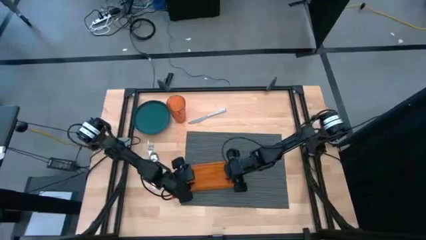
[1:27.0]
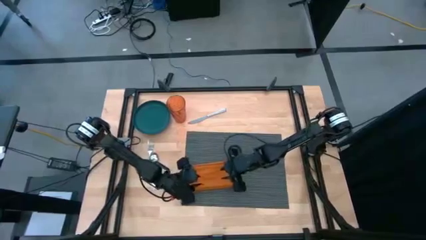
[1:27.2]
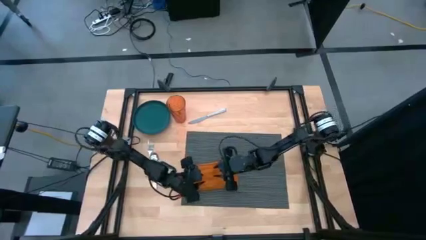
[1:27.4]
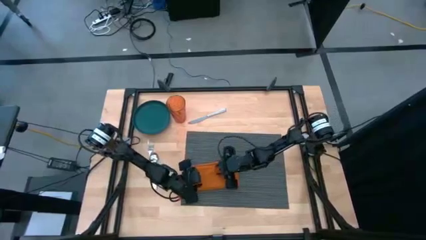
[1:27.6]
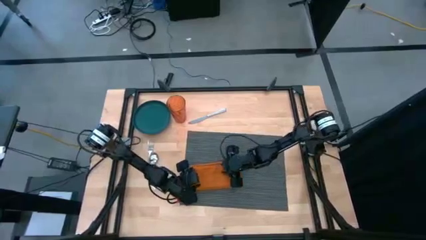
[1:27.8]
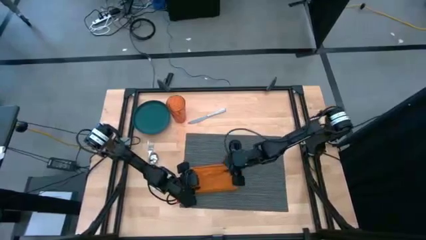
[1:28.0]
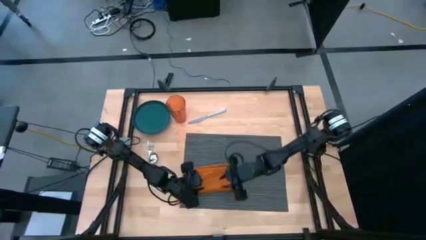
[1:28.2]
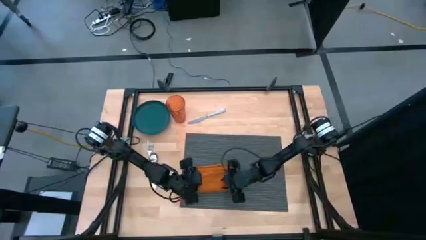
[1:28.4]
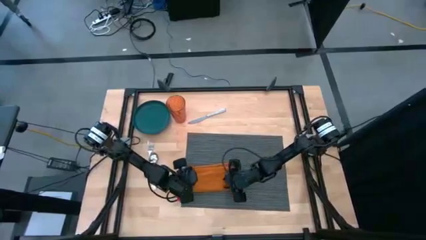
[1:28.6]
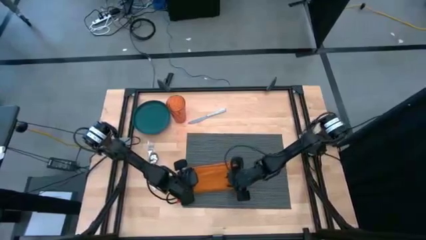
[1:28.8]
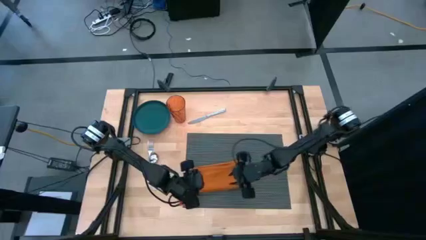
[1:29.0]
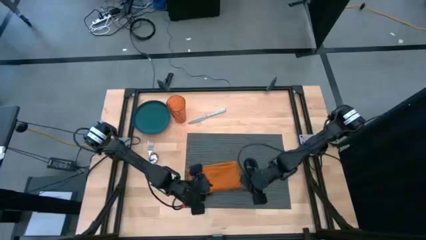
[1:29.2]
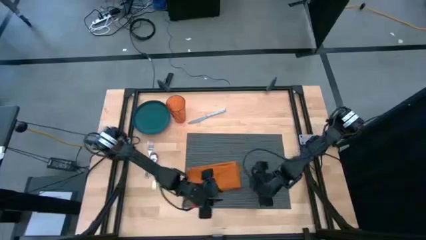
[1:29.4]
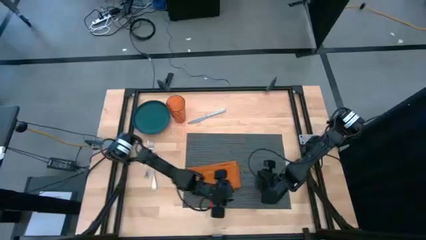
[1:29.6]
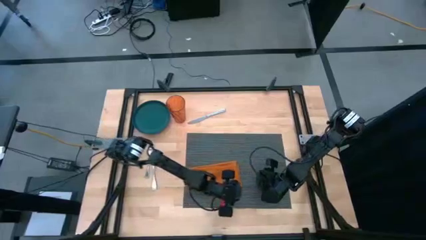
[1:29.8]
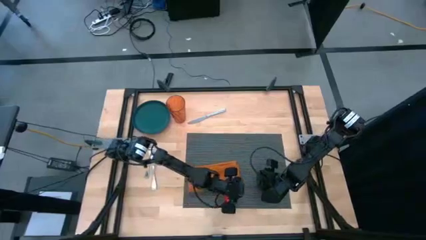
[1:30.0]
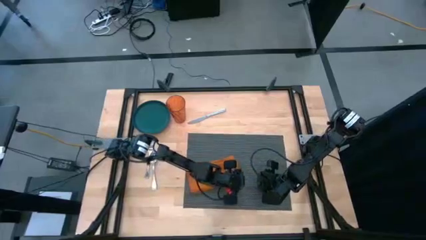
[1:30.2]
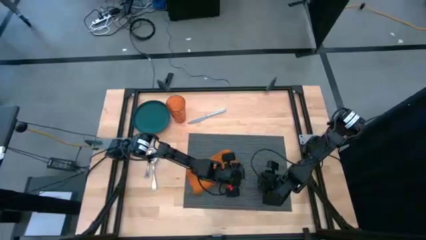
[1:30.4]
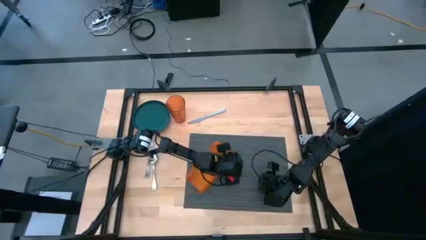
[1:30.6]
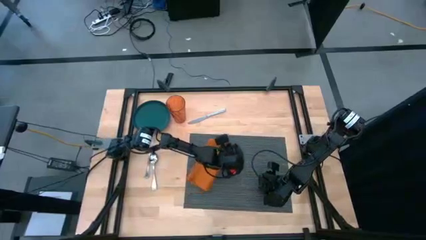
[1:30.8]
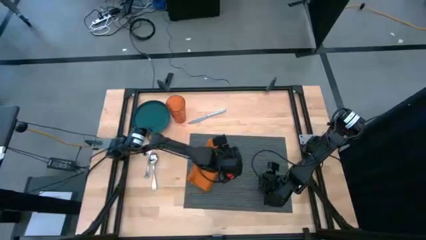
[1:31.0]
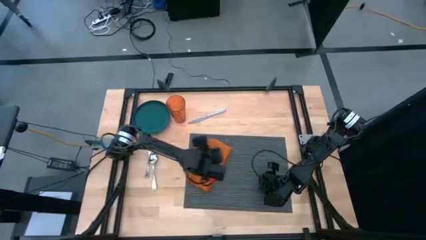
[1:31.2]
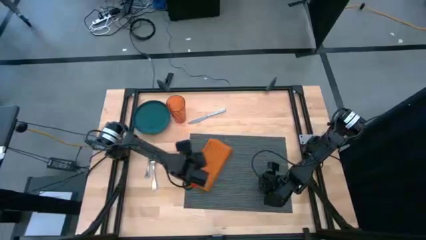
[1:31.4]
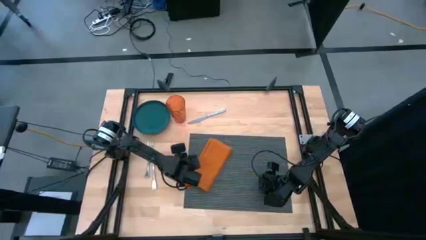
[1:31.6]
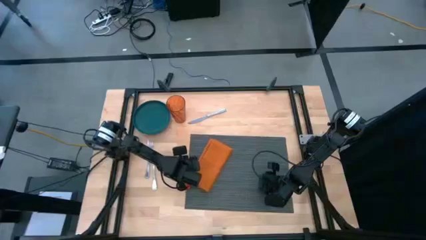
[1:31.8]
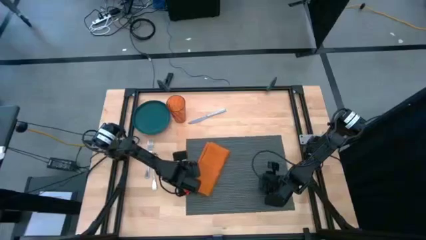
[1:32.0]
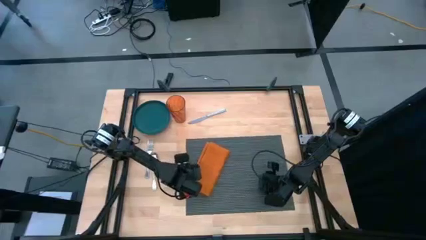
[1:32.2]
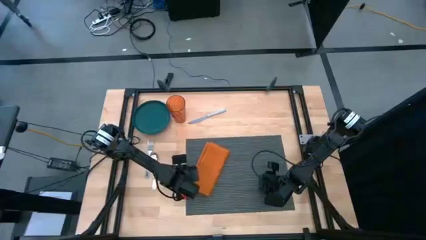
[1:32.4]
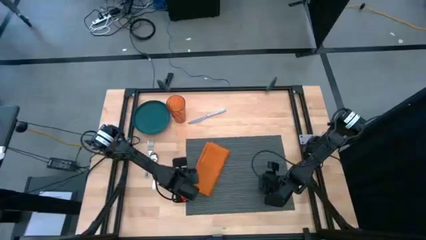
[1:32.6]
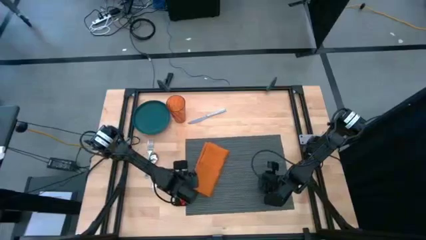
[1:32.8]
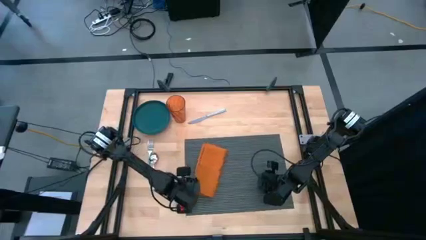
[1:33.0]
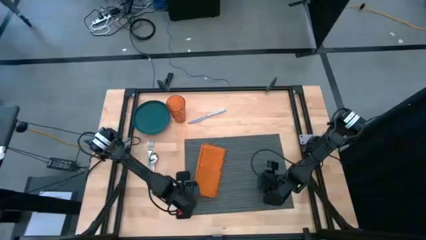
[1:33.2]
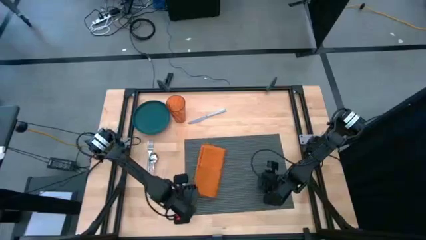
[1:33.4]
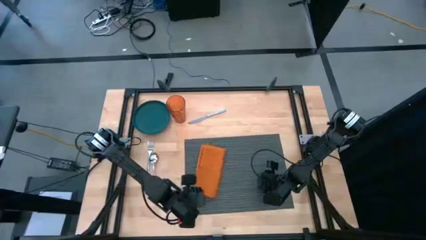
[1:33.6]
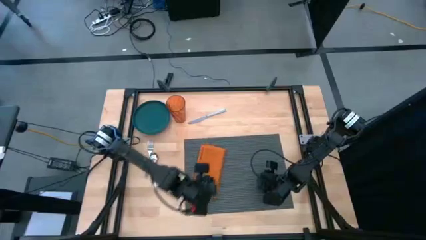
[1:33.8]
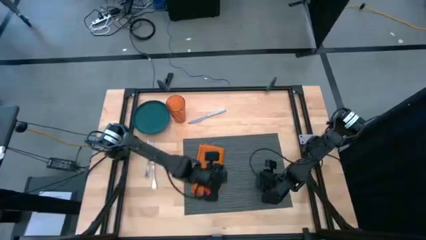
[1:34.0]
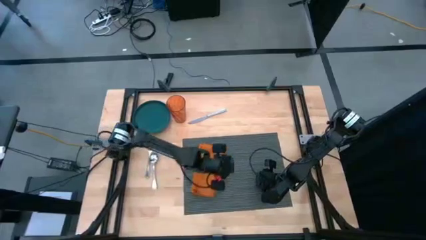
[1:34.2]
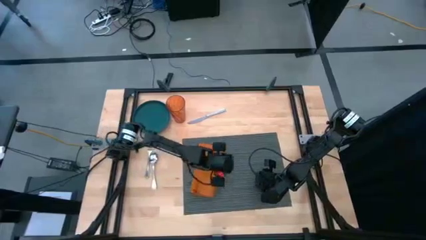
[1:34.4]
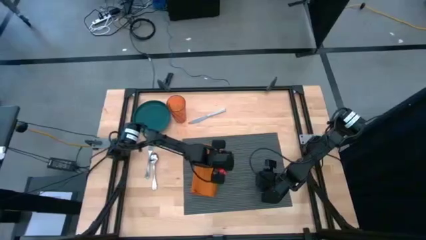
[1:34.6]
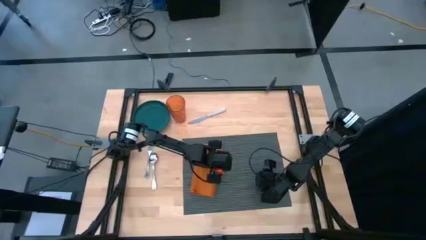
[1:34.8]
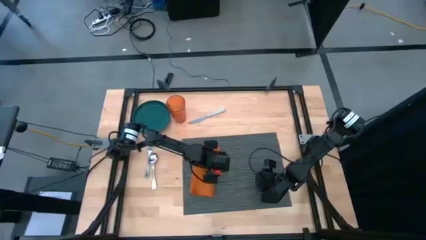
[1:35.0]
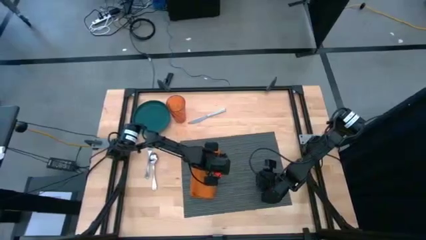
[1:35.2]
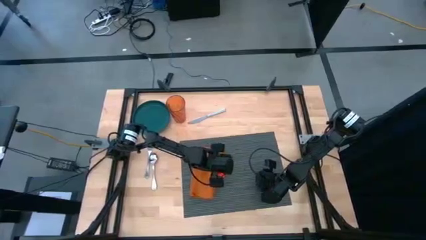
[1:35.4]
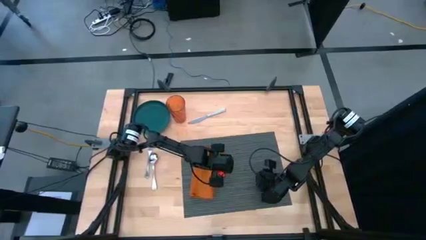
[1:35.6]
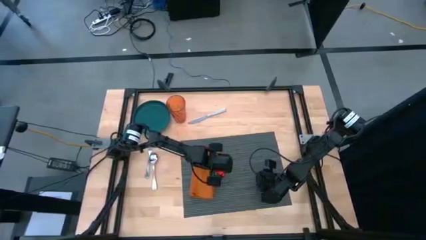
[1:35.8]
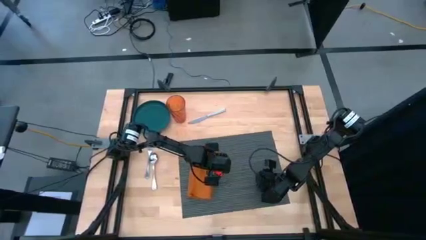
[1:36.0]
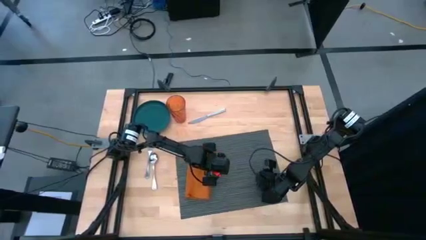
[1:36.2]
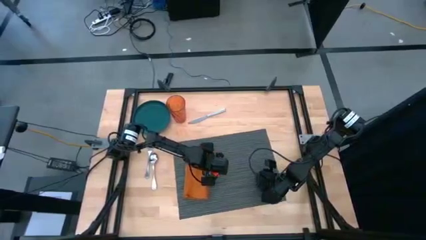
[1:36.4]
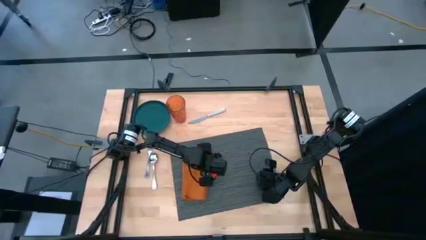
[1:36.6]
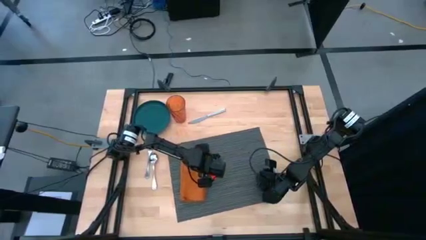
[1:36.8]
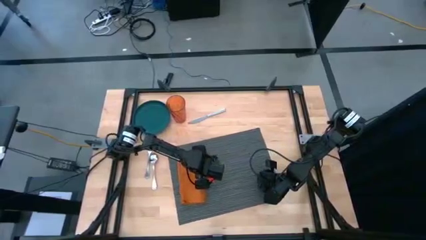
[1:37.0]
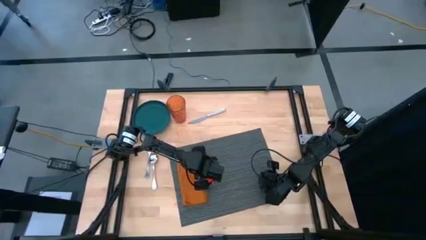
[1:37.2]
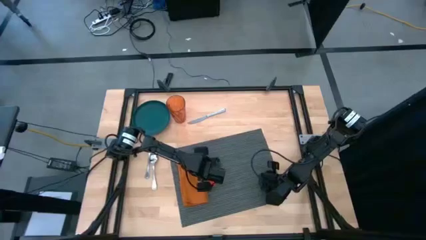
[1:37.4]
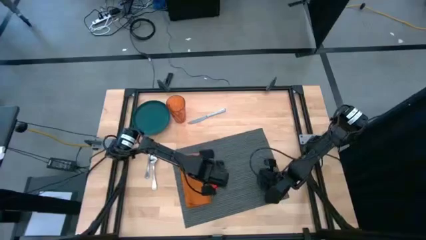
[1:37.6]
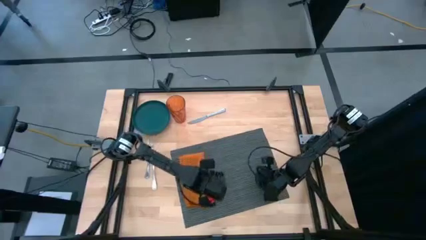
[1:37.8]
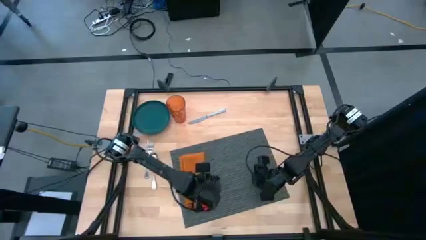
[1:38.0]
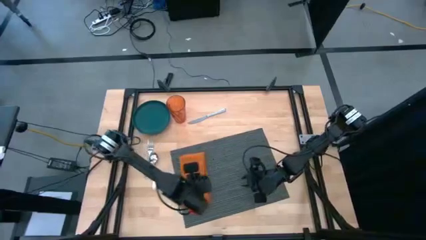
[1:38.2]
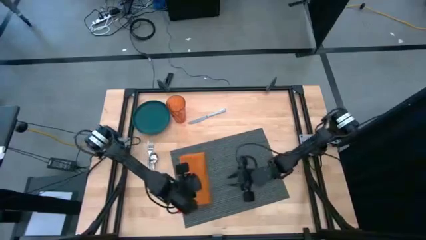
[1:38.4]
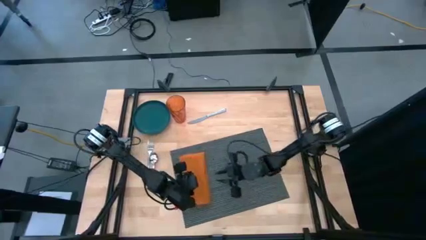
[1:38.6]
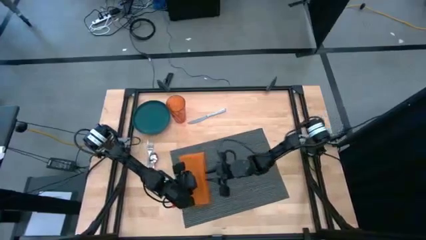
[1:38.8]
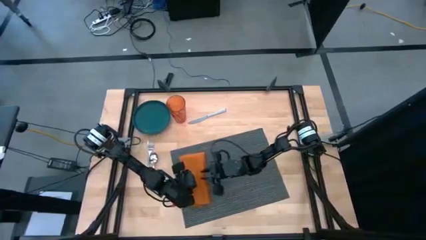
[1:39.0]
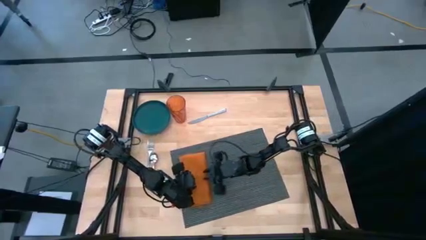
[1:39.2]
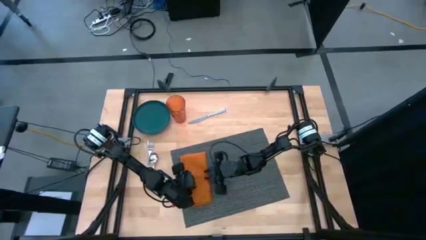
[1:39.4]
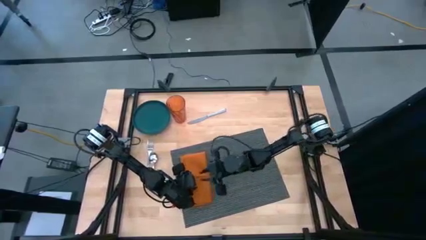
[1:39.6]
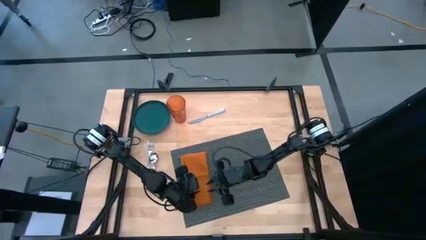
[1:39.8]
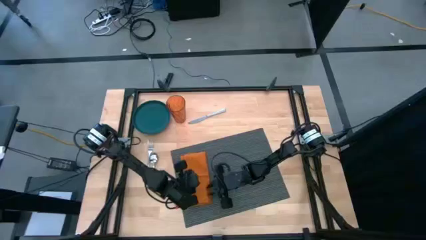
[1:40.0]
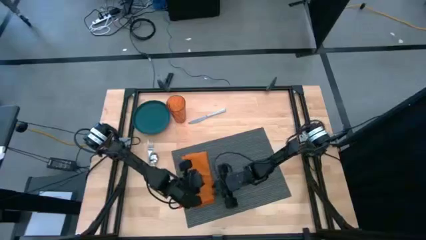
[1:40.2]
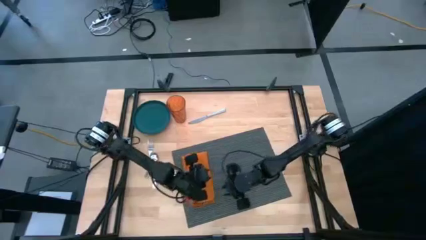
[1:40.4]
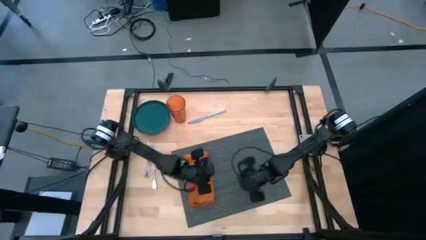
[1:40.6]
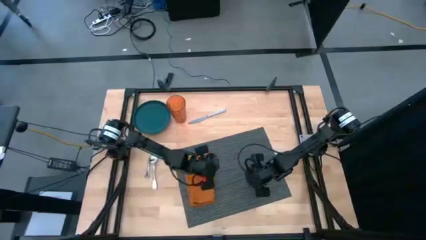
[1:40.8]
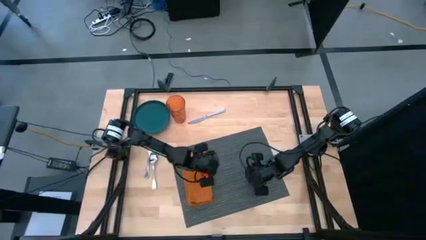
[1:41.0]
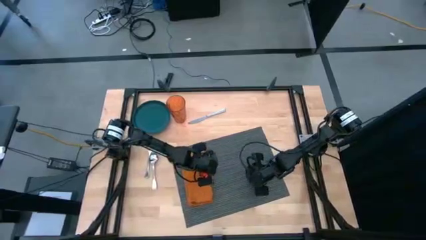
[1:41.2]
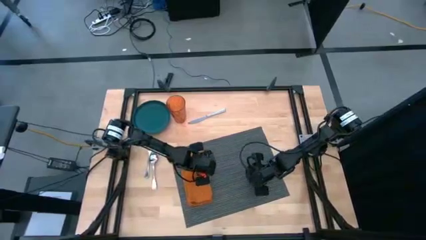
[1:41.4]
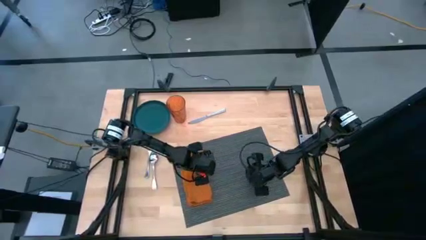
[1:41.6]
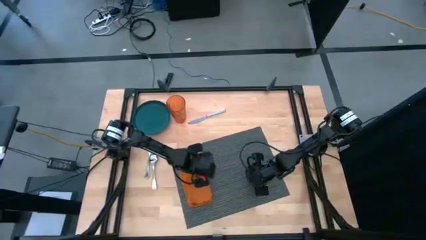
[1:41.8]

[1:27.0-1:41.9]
Task: Set table place
Move the orange table napkin to the middle left of the black placemat

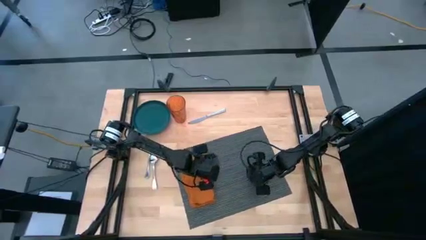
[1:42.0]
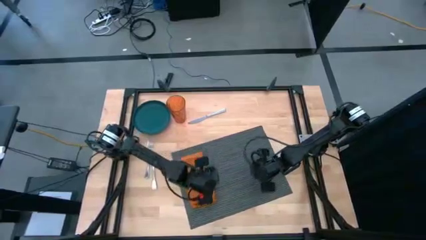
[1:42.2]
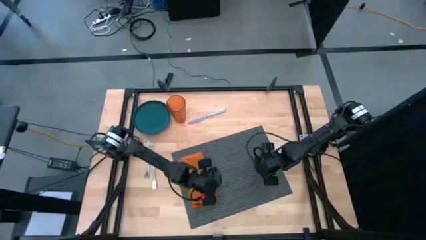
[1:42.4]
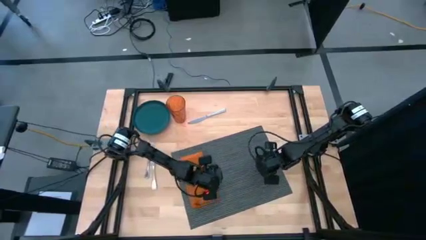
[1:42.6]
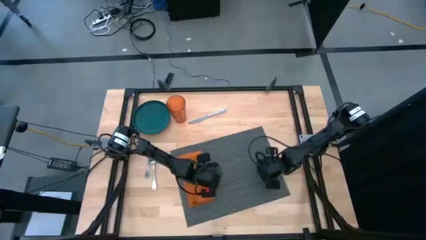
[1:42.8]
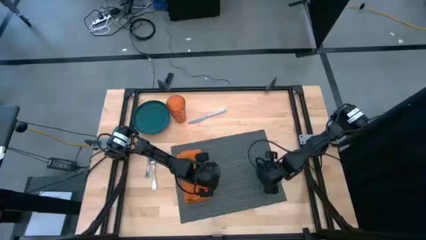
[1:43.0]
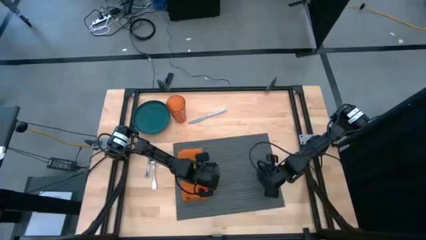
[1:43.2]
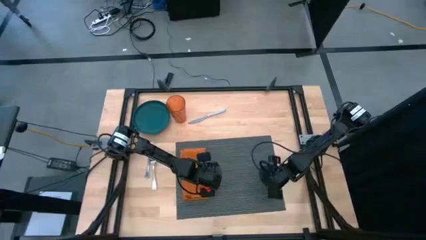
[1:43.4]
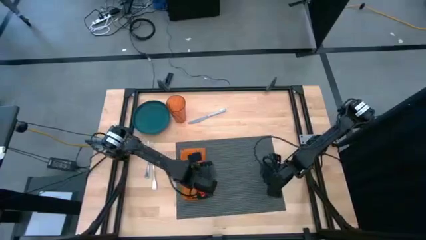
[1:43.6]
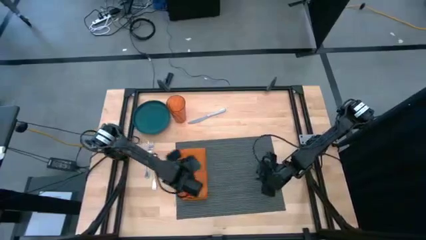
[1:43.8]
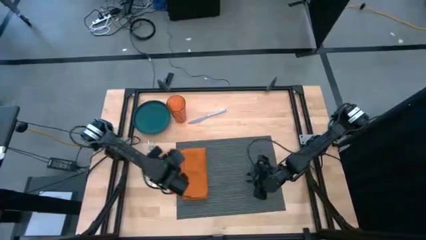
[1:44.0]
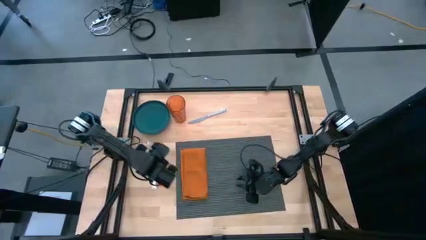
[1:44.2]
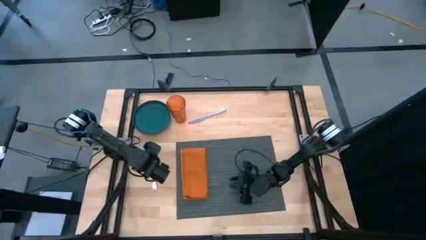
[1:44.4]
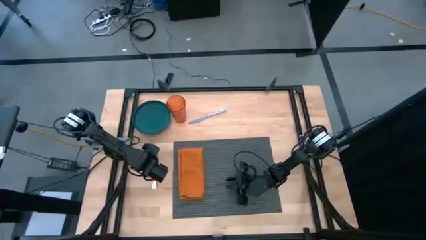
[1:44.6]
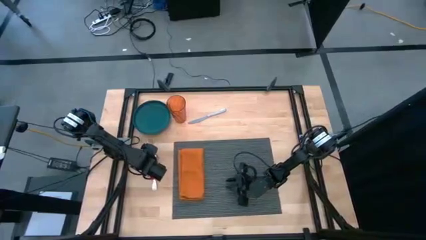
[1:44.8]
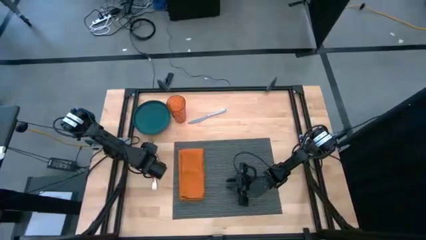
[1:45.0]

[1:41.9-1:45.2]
Adjust the black placemat
